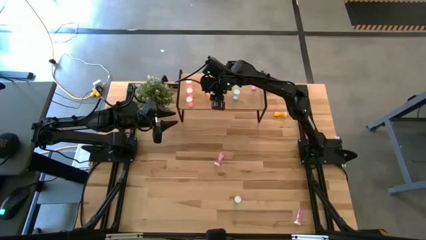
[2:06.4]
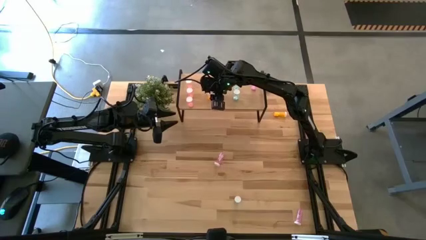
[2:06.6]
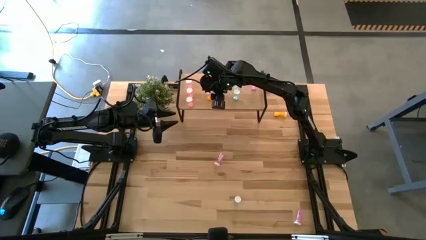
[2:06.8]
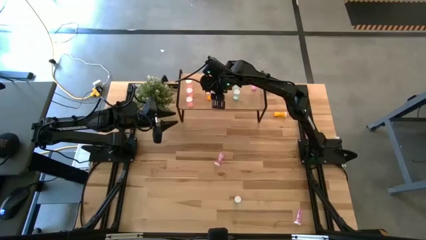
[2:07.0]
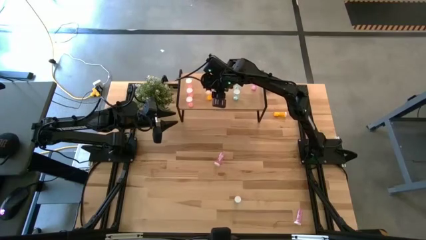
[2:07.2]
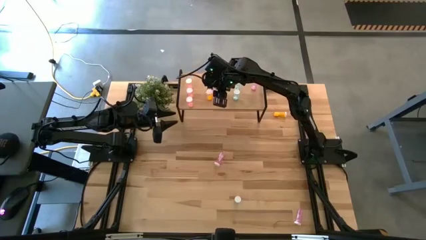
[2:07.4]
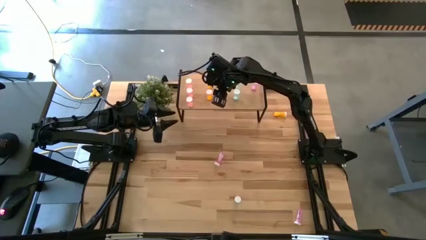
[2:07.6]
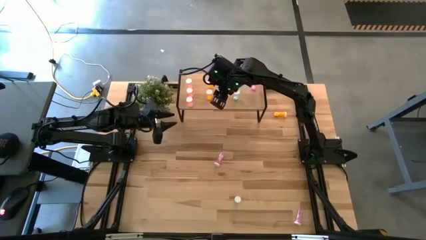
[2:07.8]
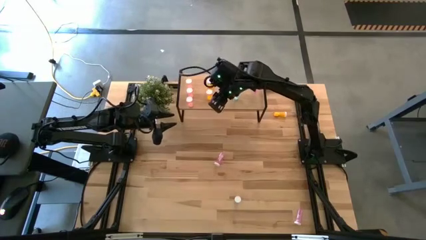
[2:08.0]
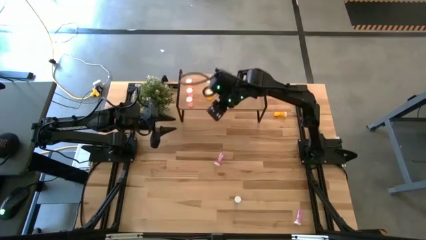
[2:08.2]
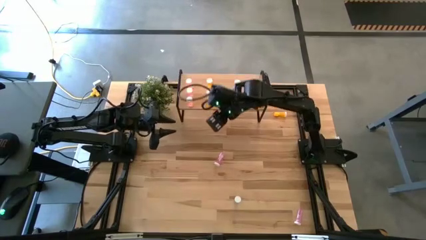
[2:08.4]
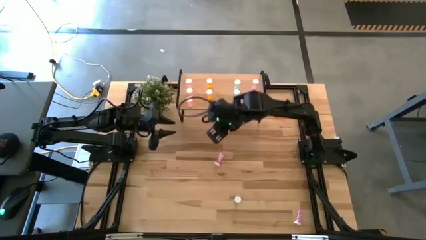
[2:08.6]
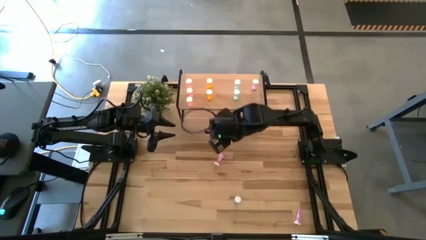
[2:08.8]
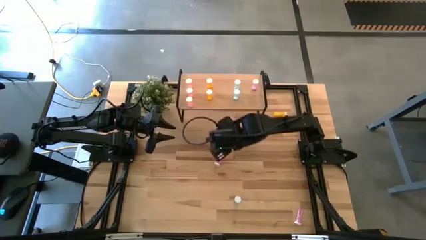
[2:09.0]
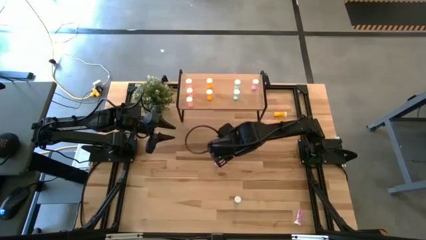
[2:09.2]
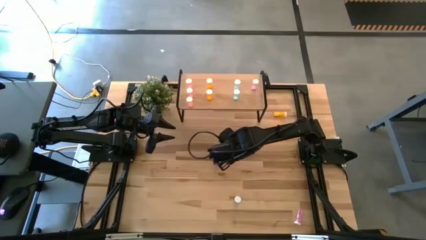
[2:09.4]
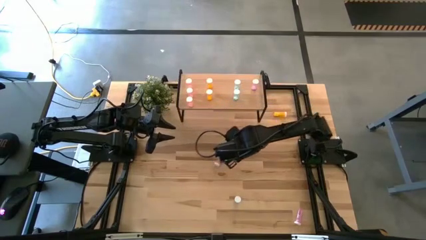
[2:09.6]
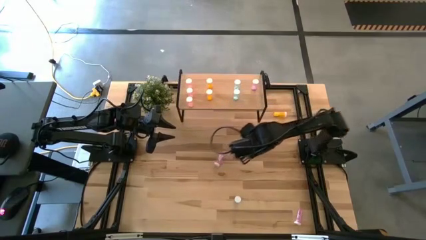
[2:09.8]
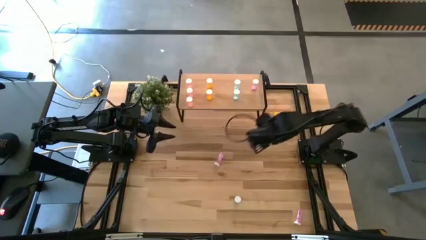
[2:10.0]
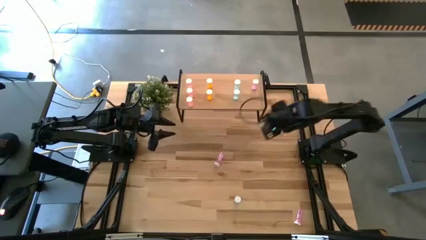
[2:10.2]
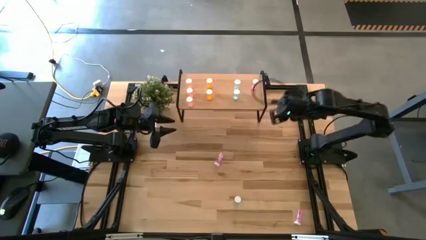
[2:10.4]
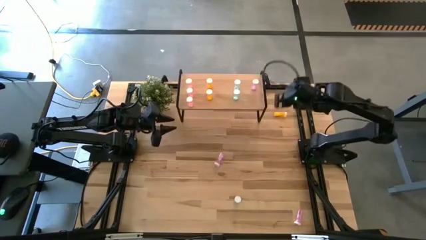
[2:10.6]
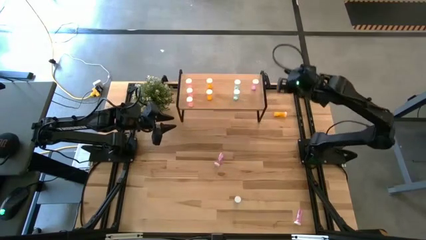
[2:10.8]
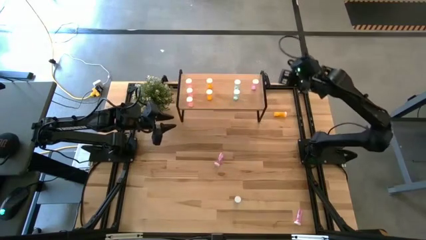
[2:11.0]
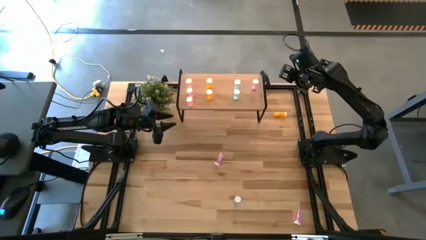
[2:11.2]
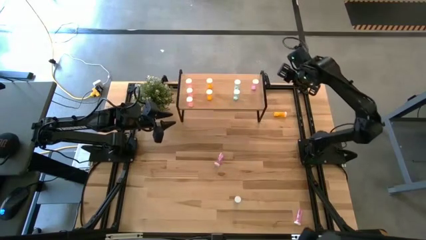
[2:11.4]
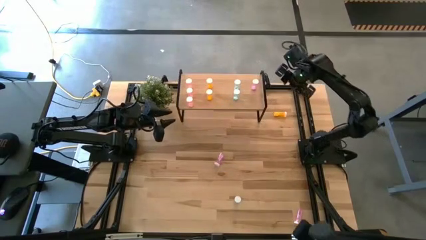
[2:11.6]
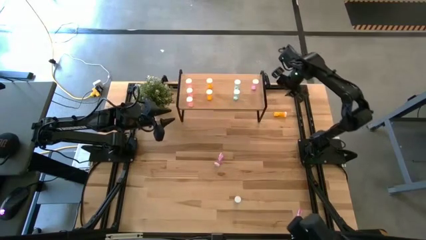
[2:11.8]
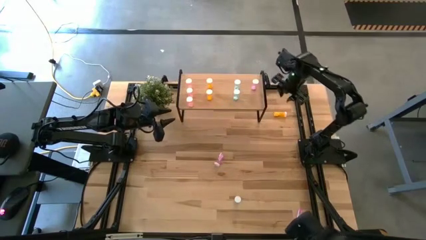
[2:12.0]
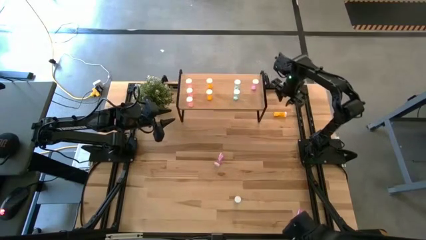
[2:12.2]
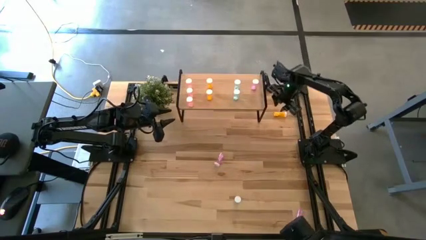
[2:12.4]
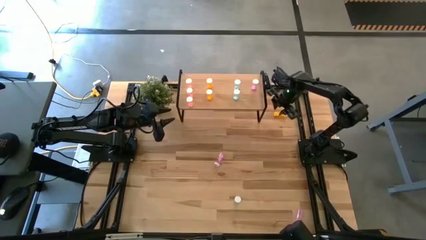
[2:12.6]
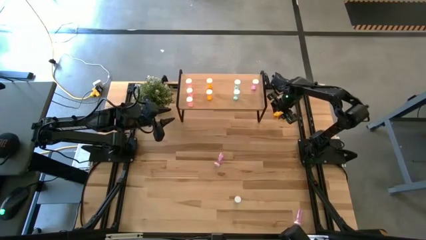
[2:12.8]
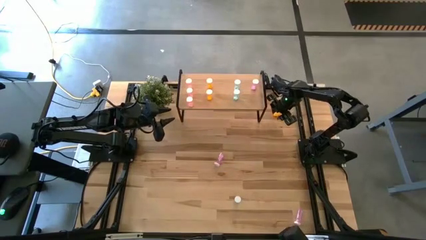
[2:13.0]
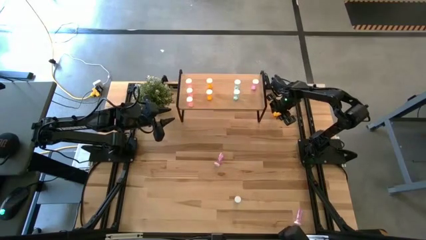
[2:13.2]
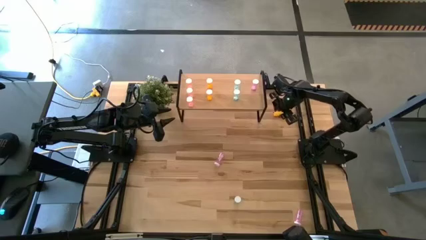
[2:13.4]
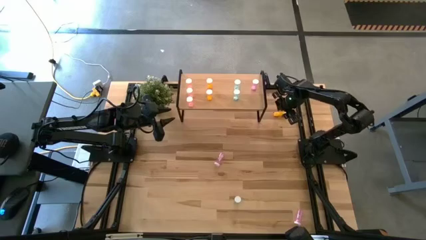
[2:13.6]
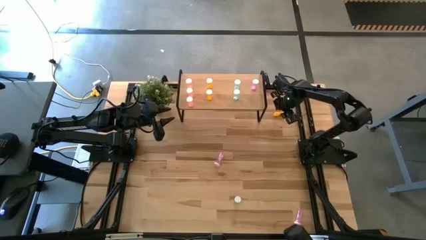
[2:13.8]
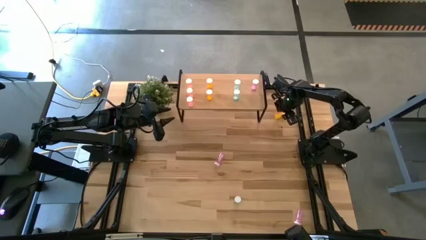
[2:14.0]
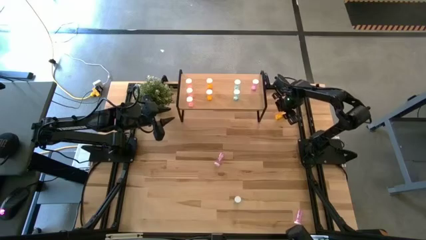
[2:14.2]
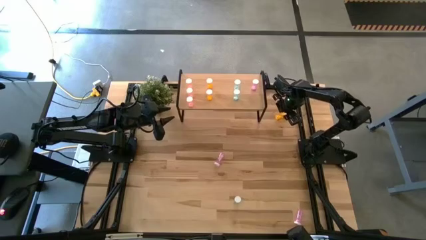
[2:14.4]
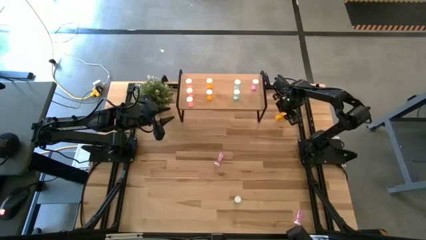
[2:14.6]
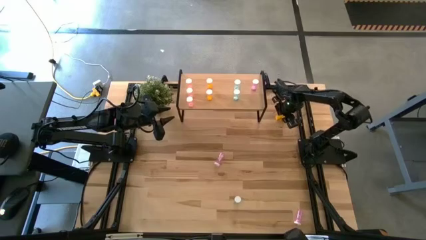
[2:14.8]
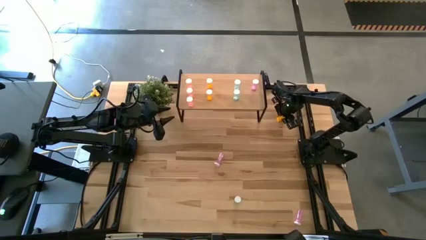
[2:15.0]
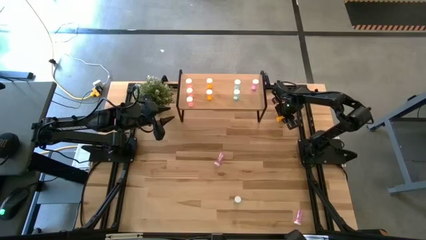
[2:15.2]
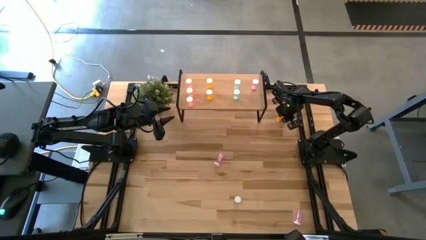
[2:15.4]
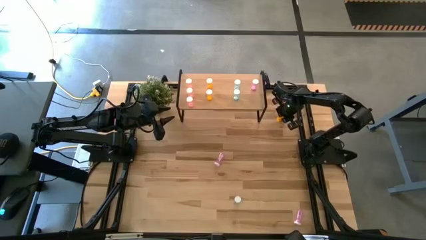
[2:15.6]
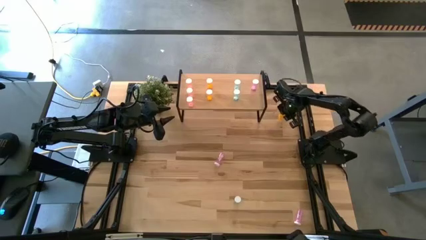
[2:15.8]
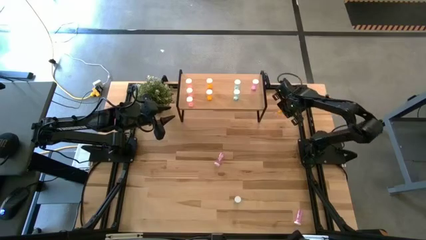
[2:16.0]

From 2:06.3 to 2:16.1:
Task: Pick and place medicine bottles onto shelf by color
Put the orange pill bottle on the shelf aligned with the other orange pill bottles

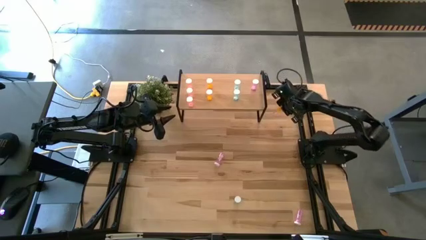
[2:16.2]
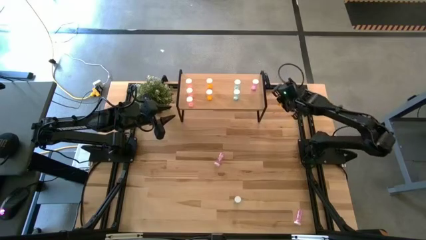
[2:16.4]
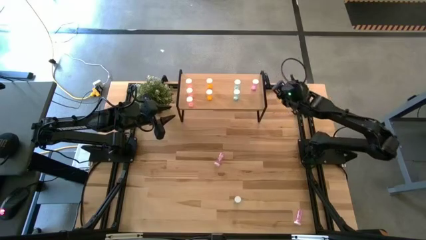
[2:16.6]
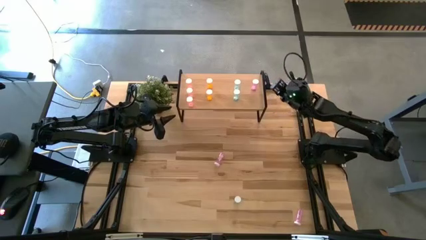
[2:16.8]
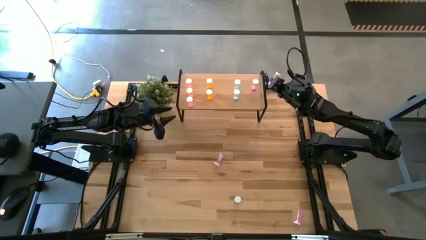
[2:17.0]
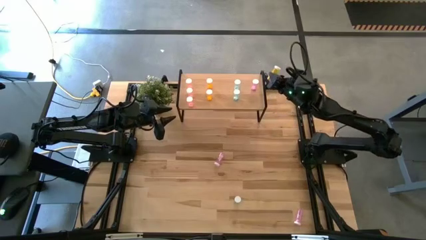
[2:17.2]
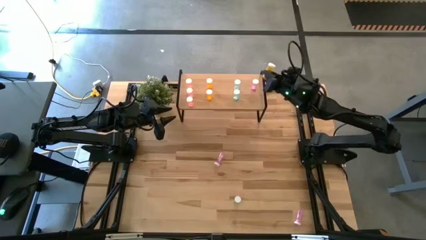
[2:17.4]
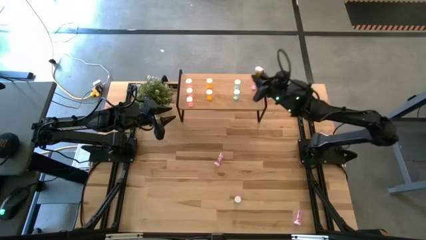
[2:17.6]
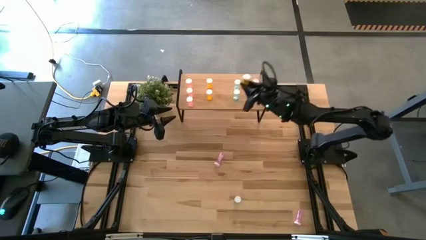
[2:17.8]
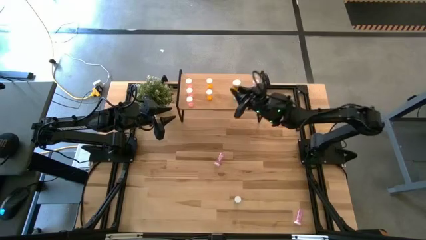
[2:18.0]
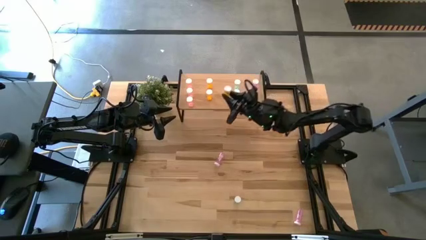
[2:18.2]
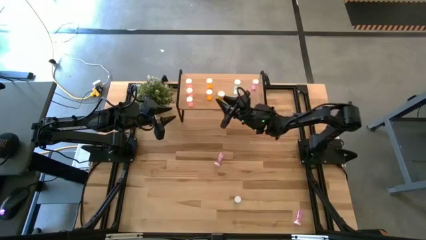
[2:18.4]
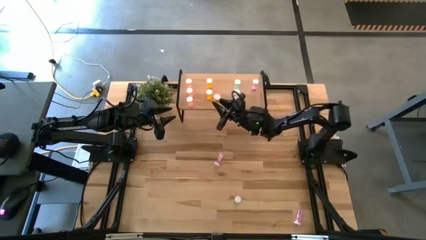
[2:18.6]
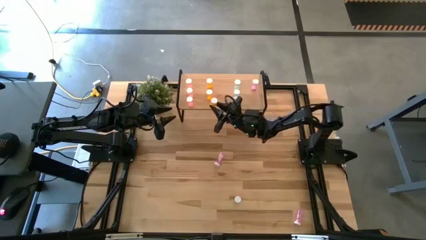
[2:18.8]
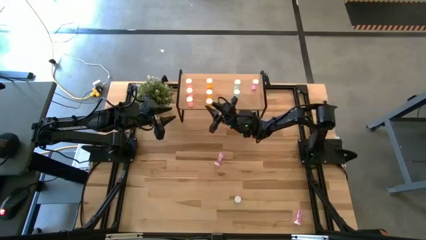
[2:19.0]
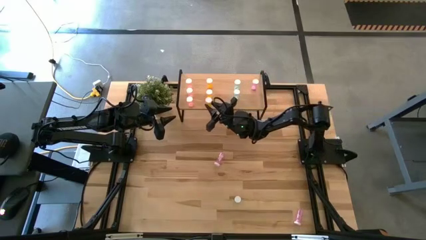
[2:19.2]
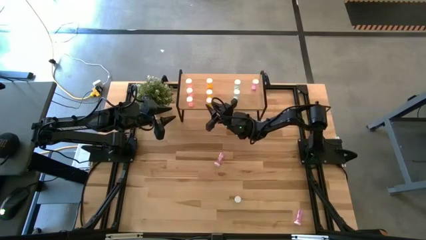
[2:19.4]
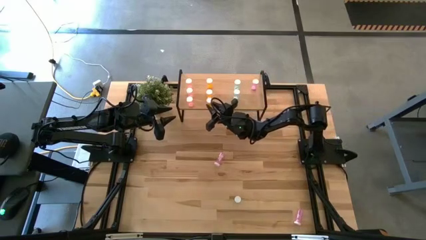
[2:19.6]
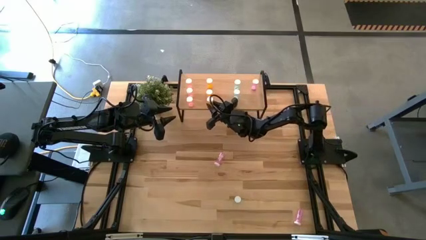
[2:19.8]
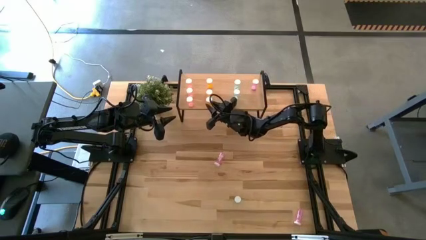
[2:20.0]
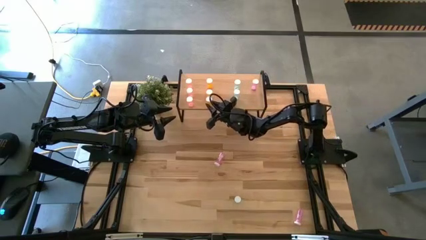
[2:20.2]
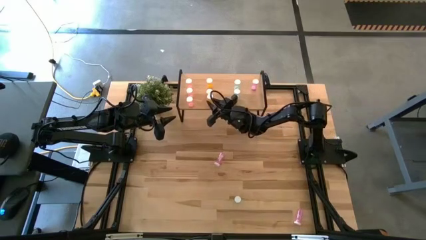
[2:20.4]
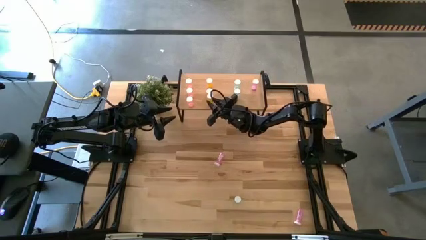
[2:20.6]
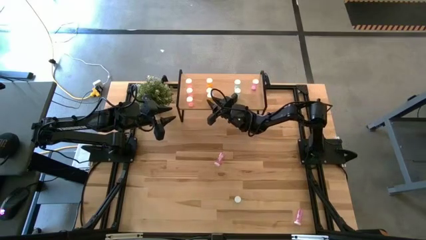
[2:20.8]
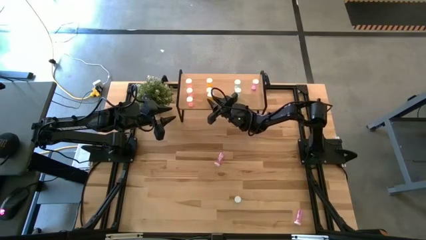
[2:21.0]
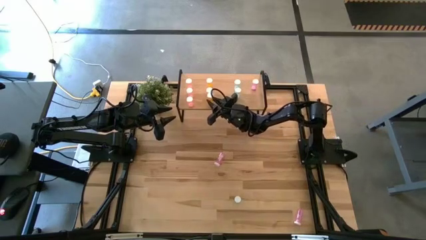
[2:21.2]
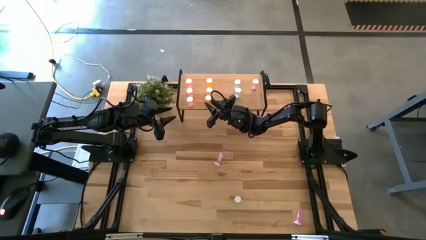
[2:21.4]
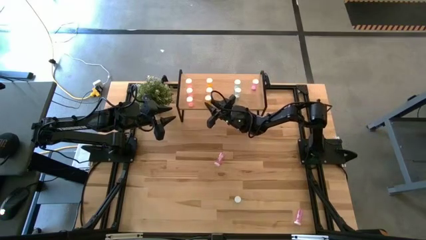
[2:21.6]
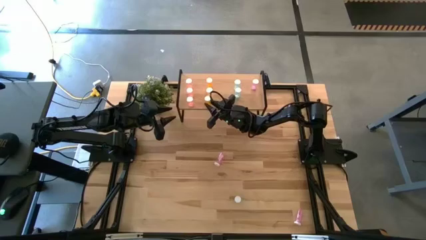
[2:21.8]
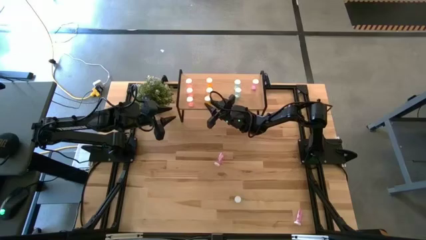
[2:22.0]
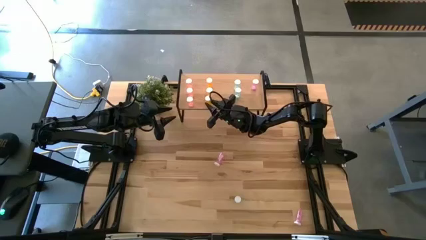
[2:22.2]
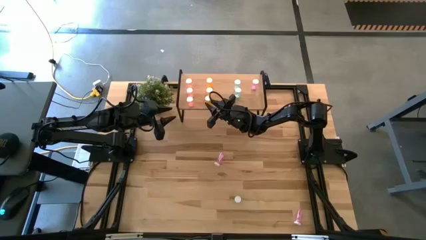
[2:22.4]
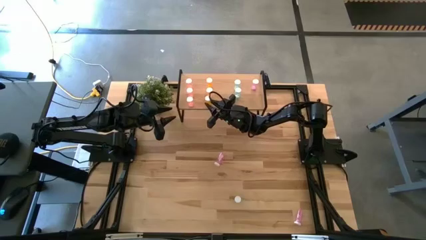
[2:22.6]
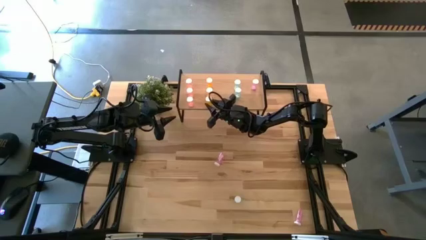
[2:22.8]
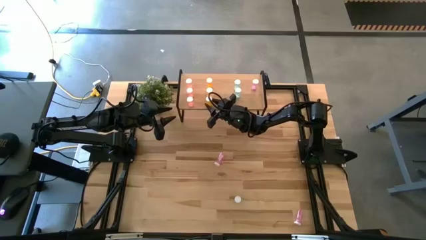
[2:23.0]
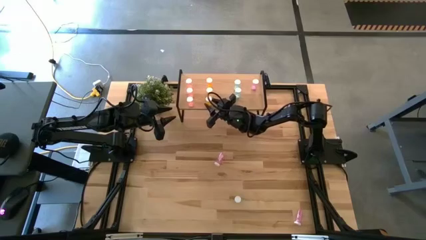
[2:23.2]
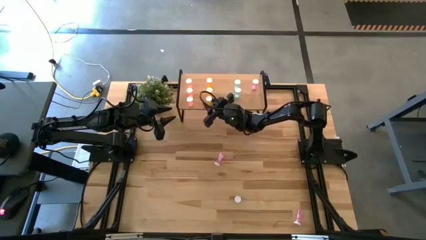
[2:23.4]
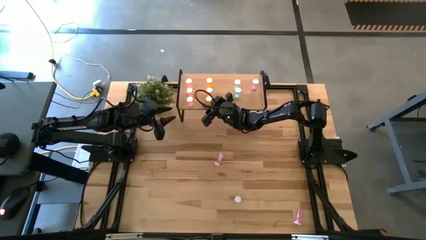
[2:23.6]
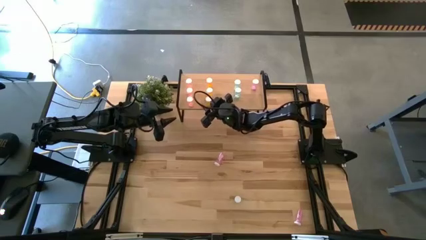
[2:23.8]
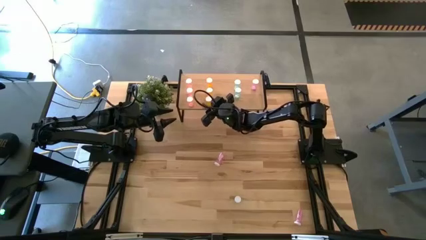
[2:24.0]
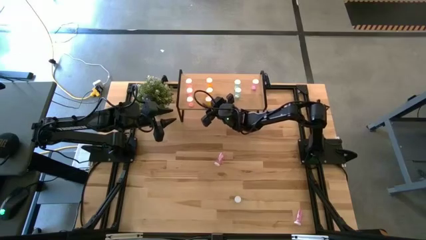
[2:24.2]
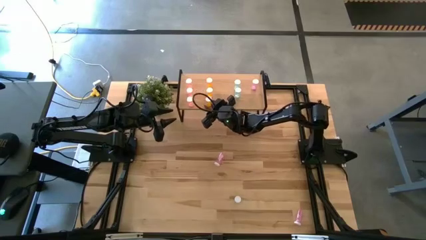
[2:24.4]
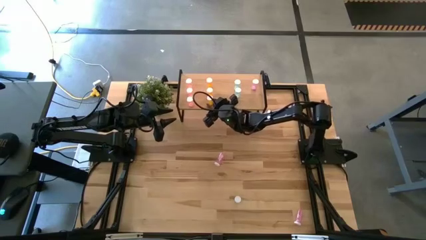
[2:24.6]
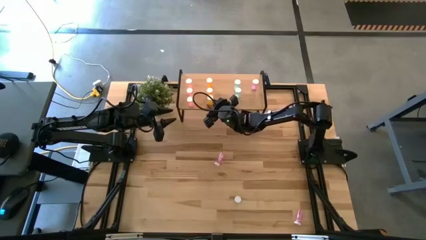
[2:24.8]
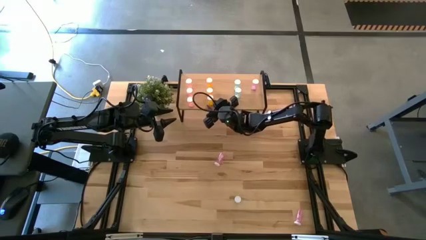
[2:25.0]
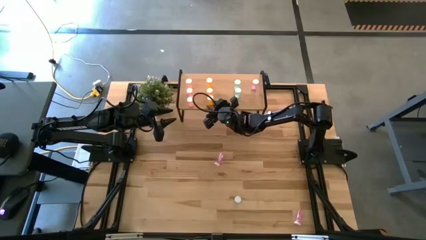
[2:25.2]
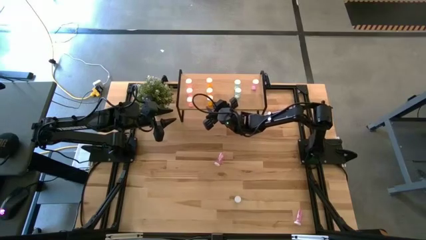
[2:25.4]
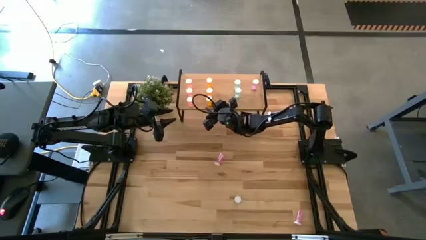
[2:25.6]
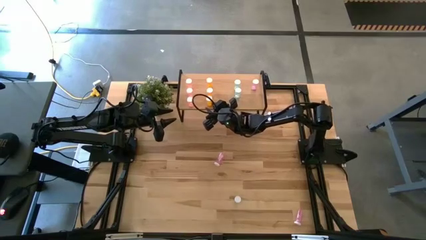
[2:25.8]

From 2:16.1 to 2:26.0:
Put the orange pill bottle on the shelf aligned with the other orange pill bottles
